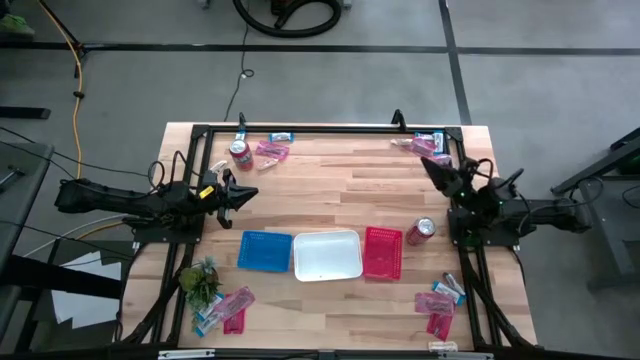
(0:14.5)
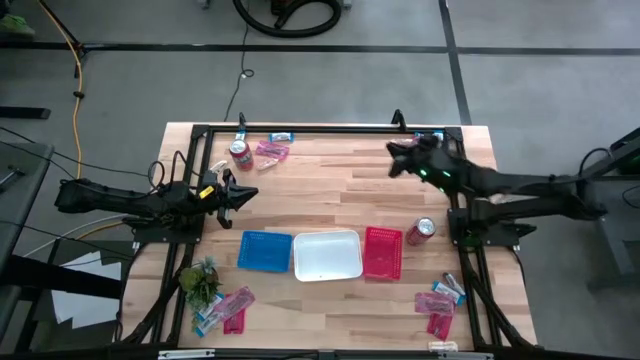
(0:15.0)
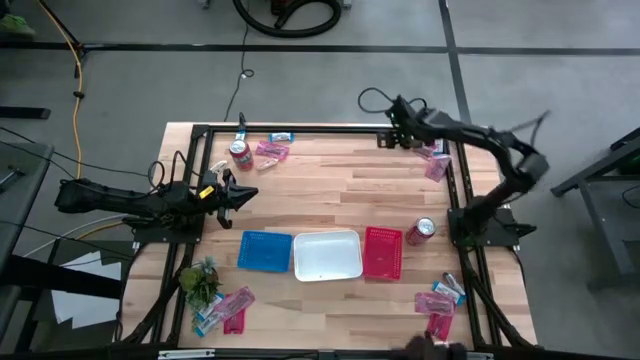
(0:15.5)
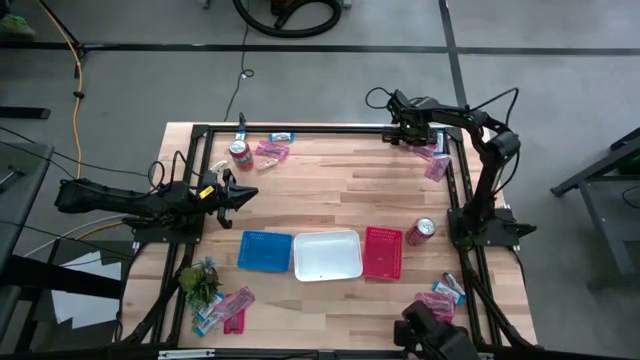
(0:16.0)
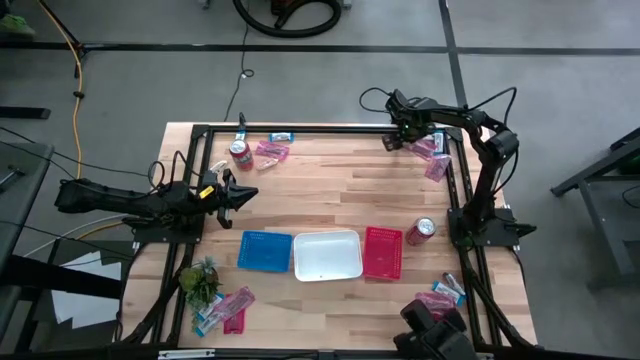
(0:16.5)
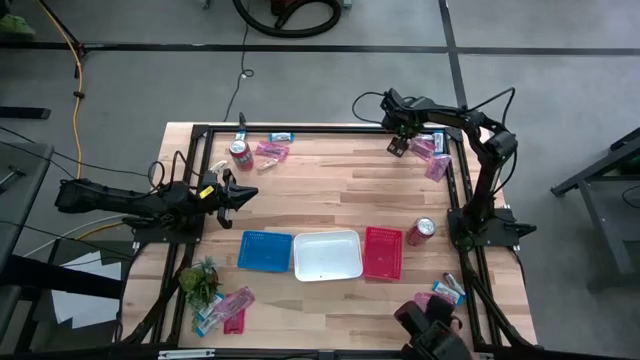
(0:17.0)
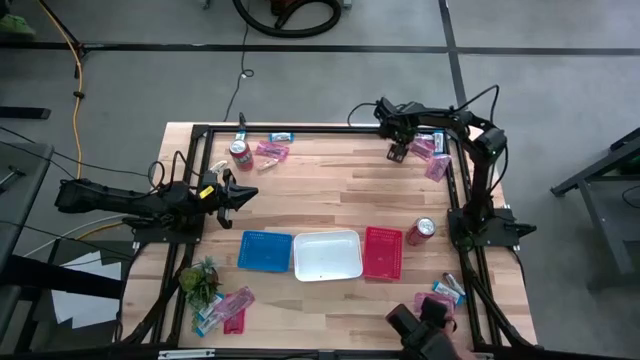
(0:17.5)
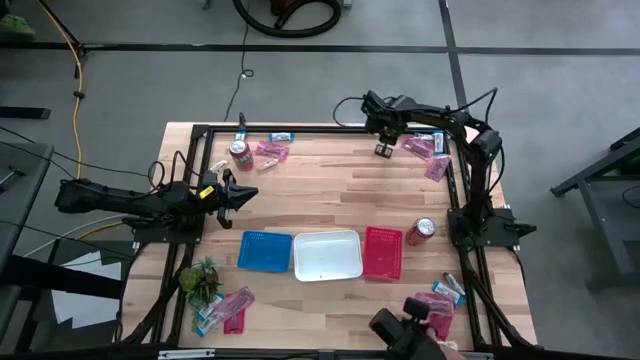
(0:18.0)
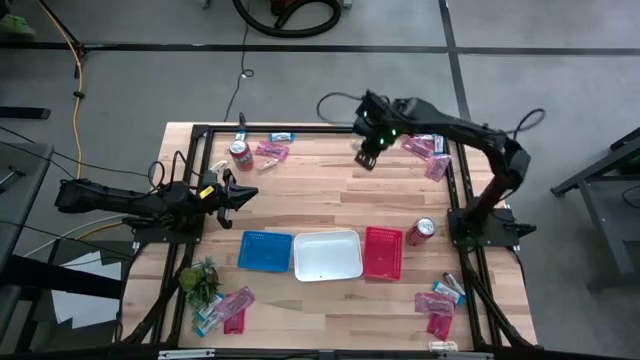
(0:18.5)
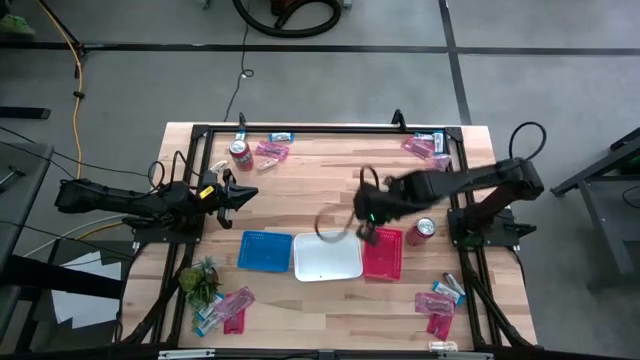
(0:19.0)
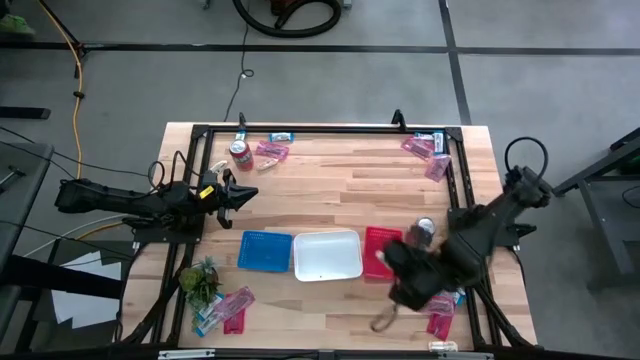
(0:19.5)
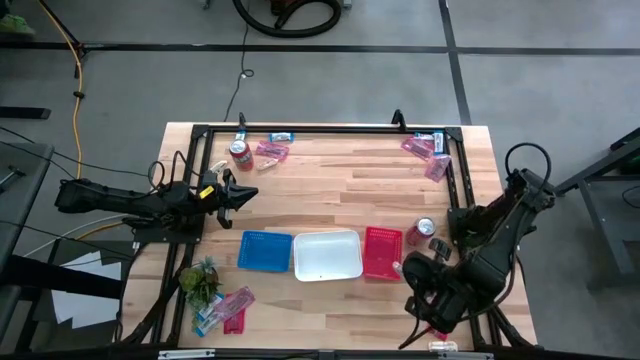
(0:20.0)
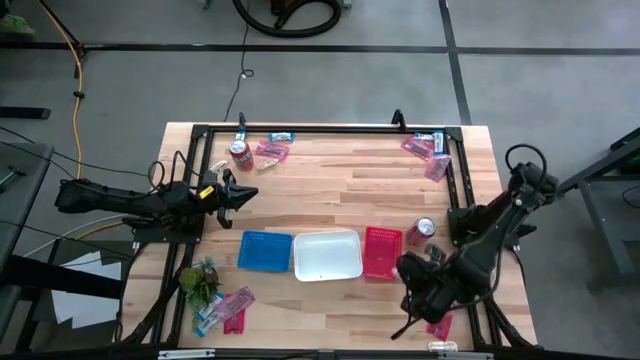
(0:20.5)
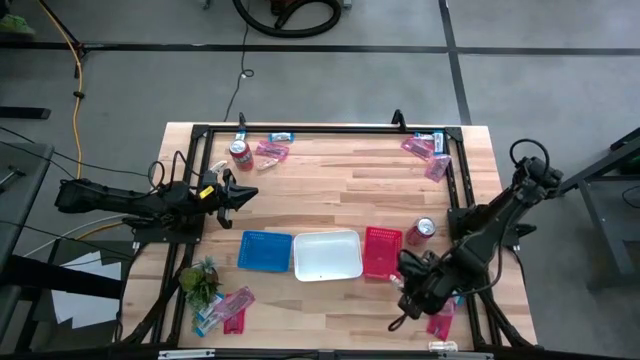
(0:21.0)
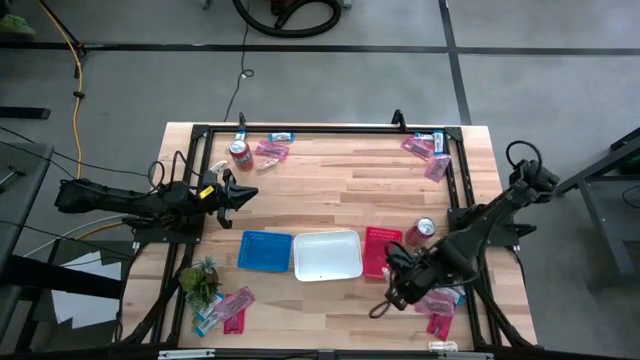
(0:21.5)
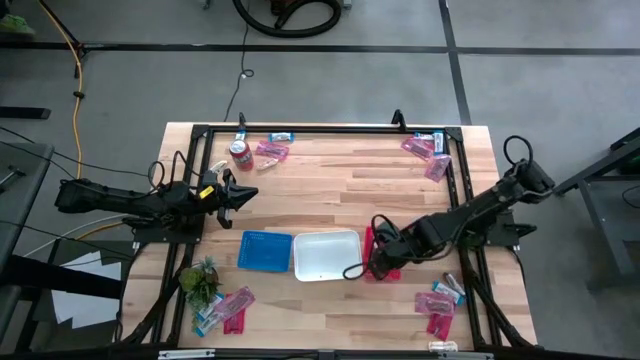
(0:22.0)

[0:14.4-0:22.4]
Task: Sort candy
Put the light brown chocolate into the red bin

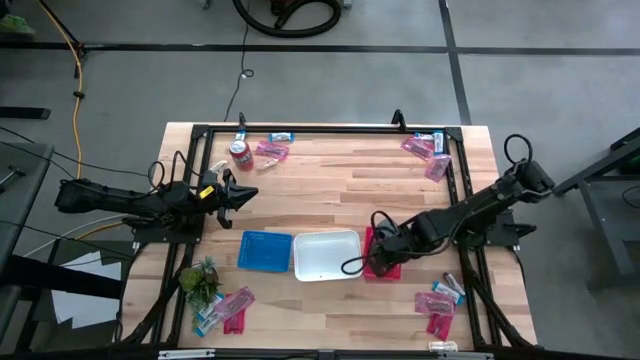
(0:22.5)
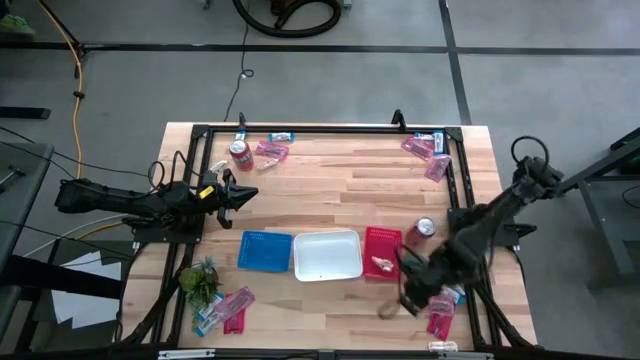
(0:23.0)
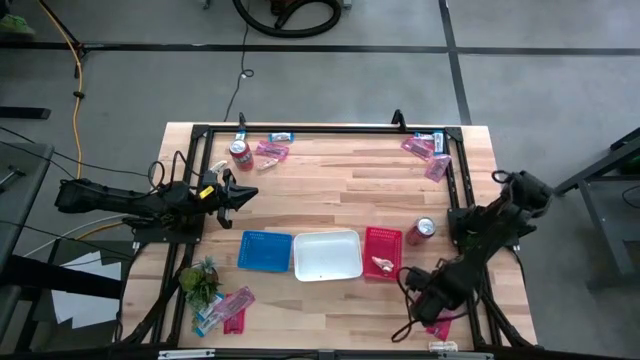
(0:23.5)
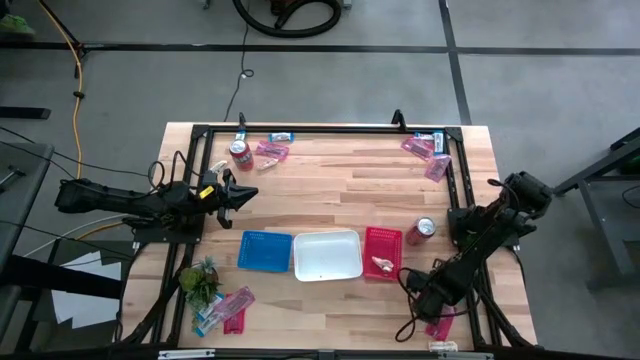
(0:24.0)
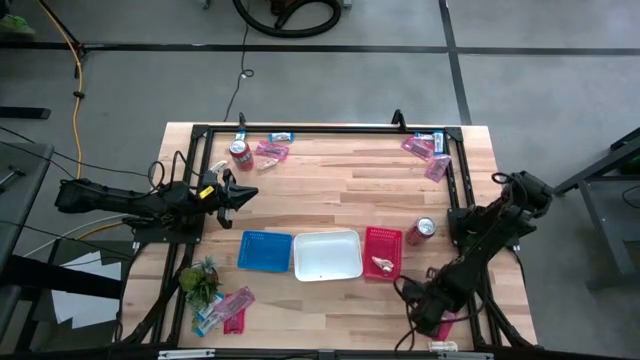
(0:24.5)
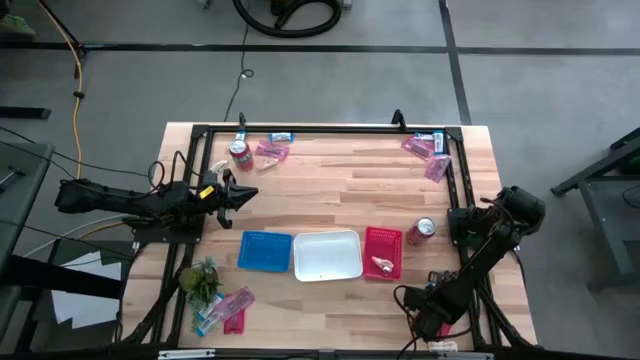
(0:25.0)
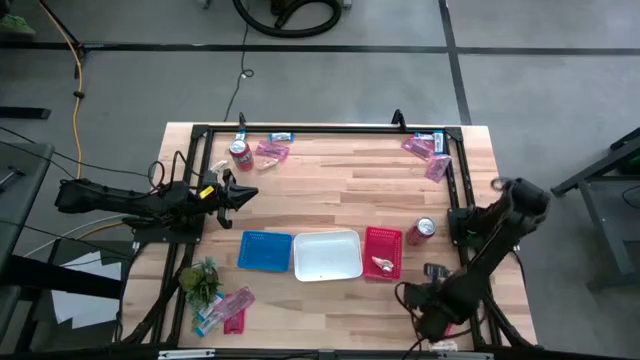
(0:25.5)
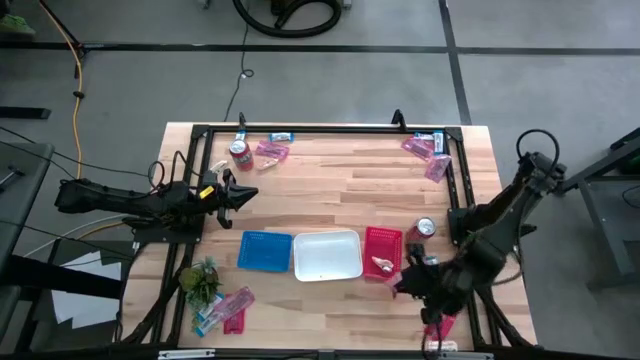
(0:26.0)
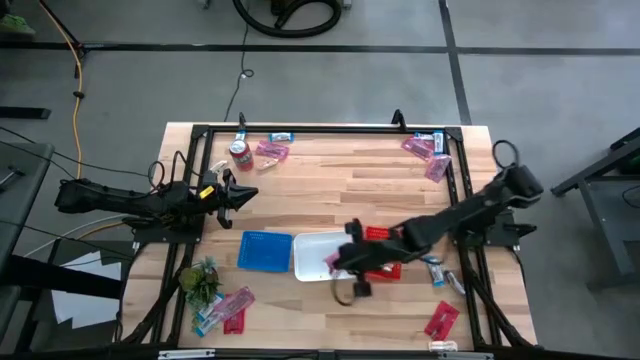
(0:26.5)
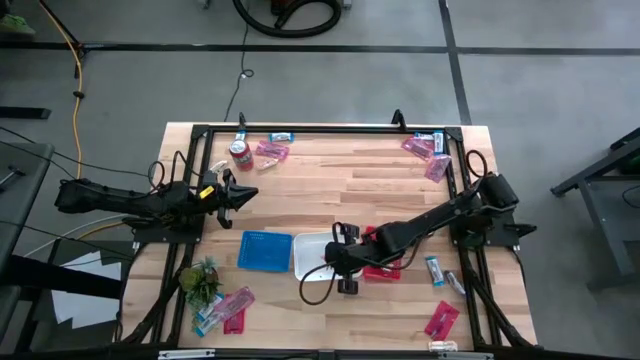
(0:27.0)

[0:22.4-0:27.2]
Put the pink candy into the white bin

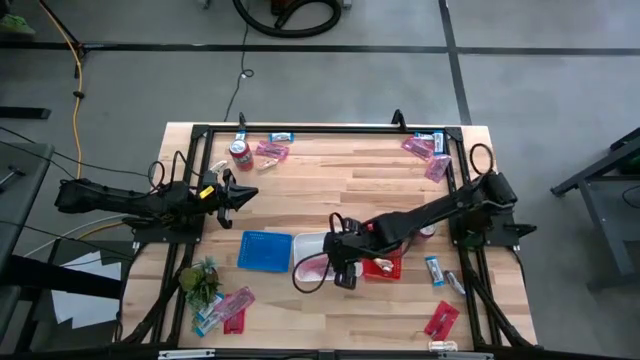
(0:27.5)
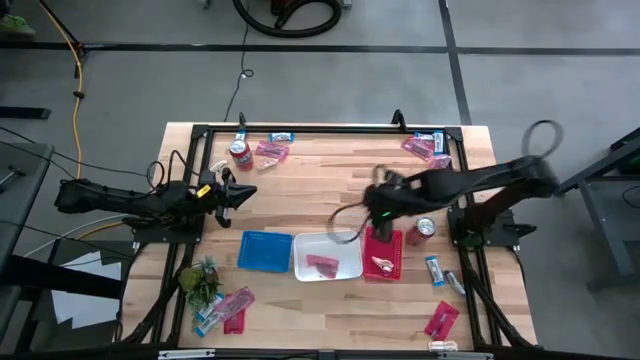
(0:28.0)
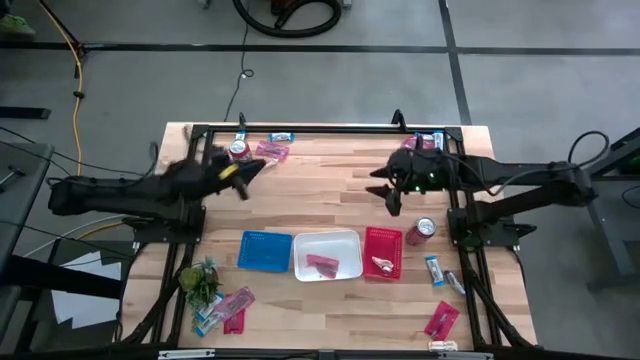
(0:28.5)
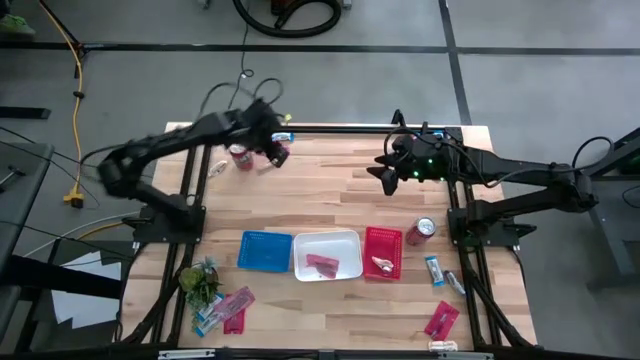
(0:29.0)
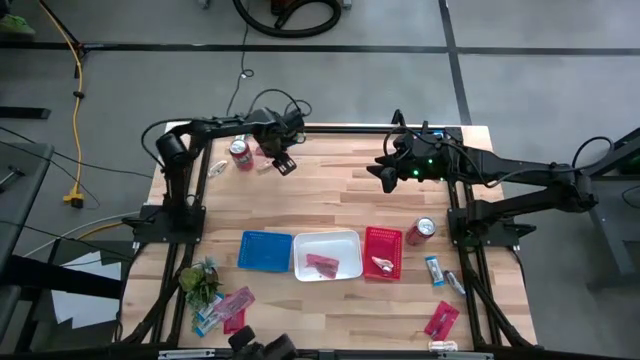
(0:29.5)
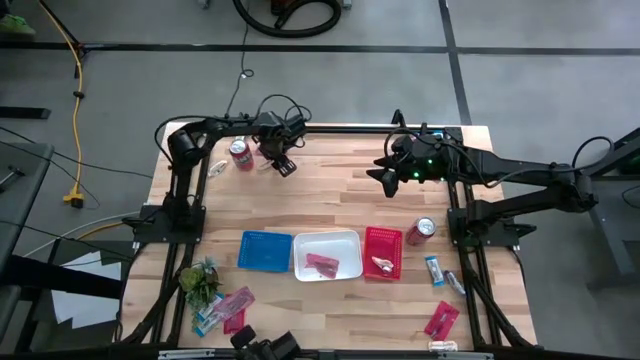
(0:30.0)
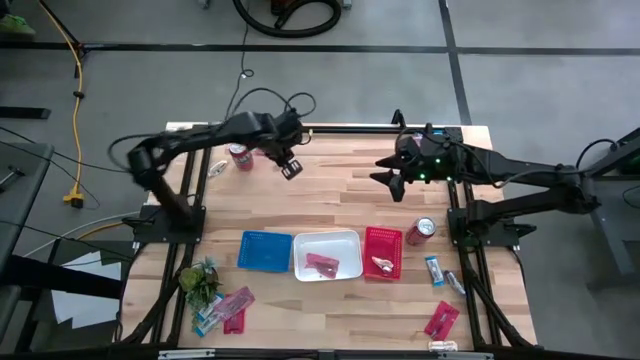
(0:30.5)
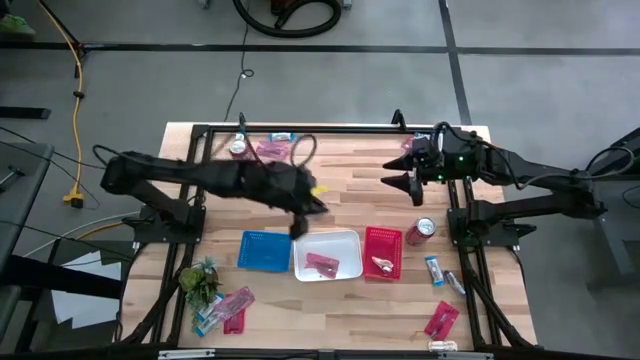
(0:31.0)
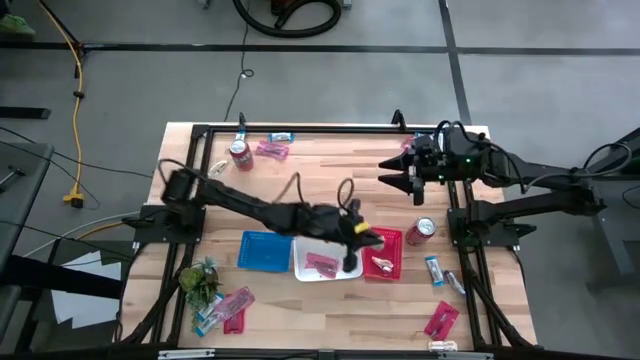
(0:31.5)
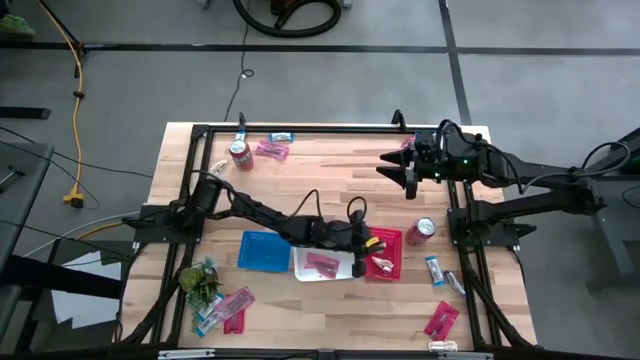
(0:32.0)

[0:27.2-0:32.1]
Put the light brown chocolate into the red bin

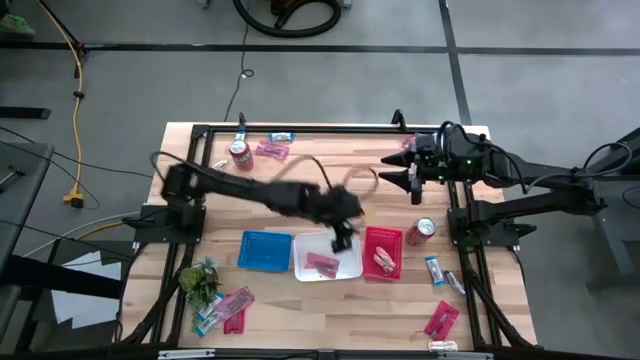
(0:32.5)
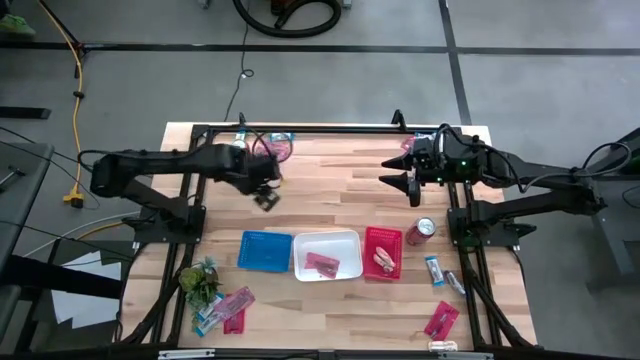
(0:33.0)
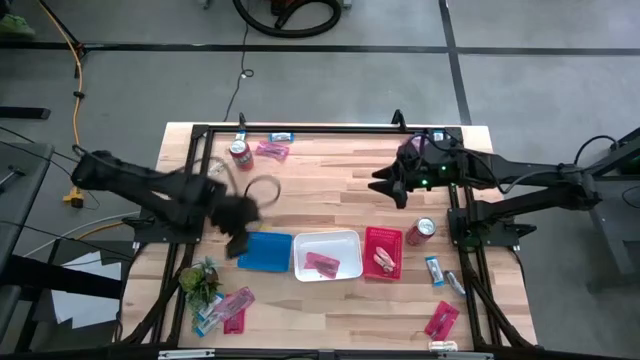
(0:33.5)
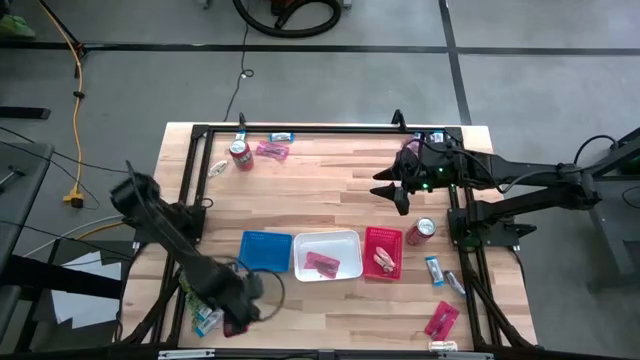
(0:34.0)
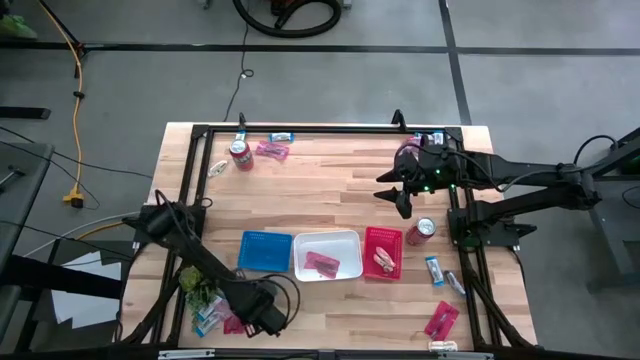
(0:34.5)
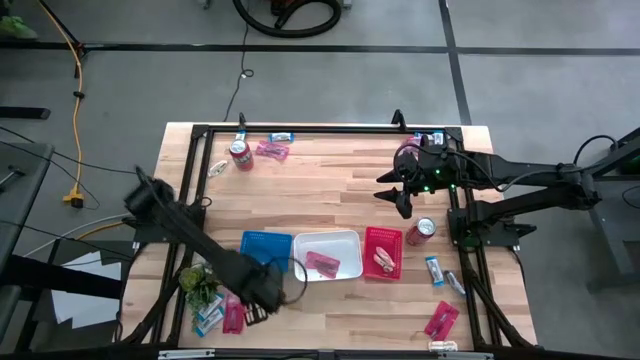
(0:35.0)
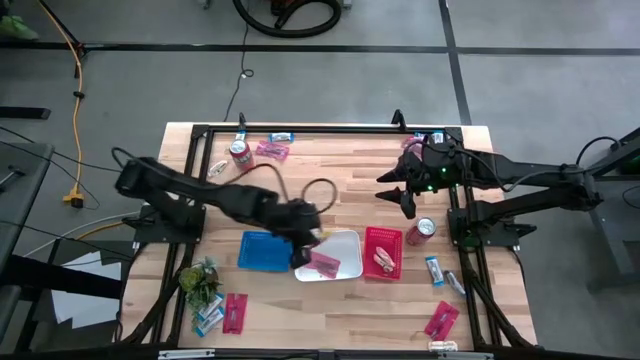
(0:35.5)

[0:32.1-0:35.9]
Put the pink candy into the white bin
